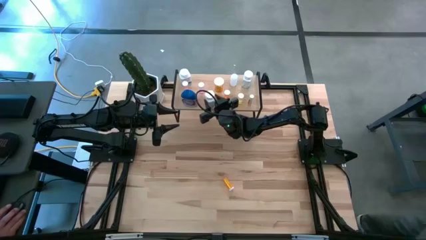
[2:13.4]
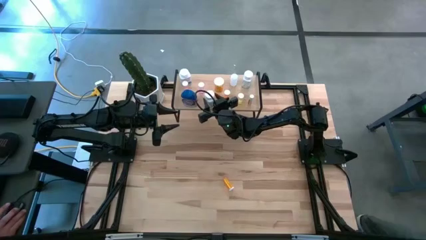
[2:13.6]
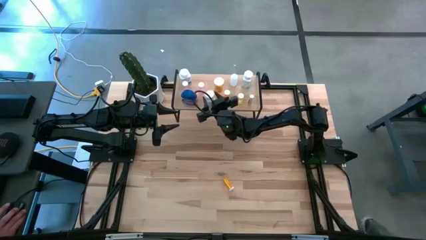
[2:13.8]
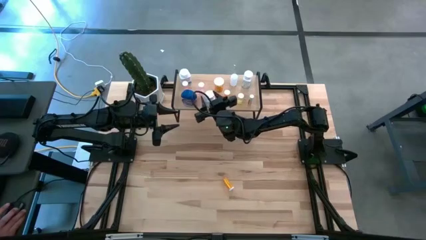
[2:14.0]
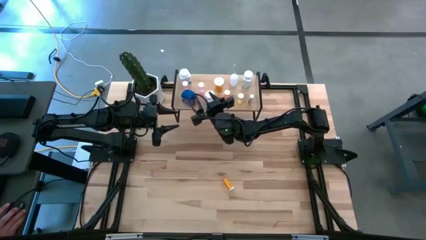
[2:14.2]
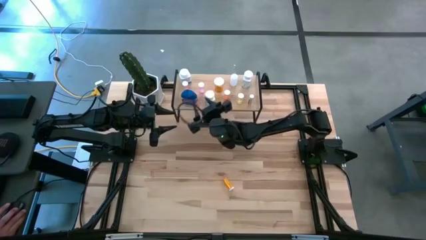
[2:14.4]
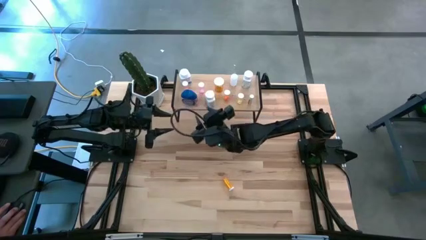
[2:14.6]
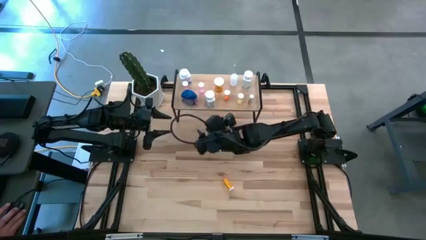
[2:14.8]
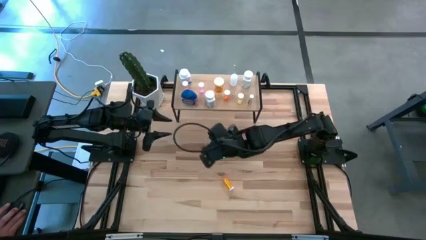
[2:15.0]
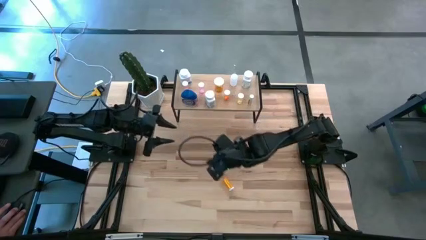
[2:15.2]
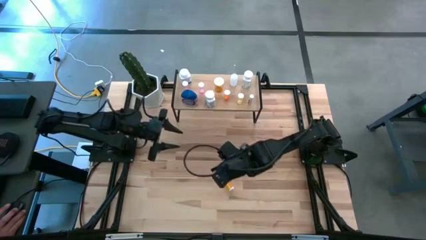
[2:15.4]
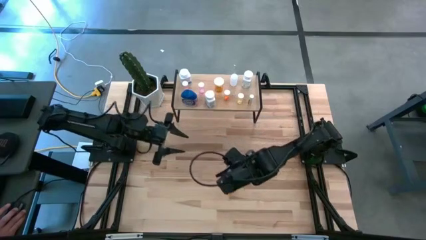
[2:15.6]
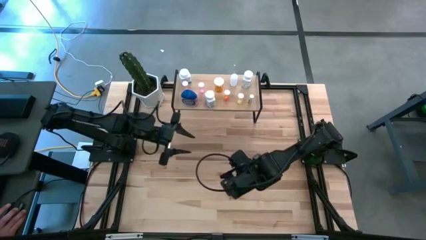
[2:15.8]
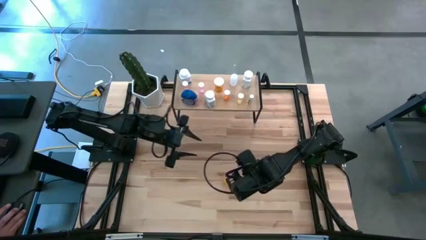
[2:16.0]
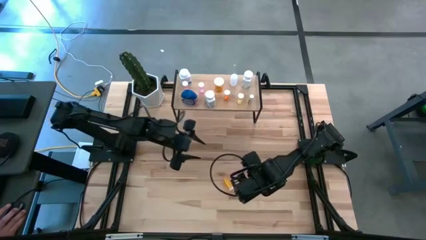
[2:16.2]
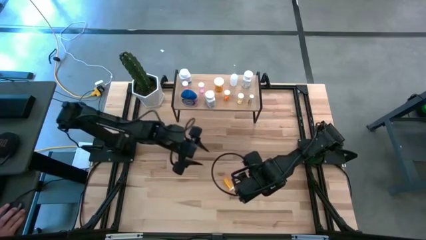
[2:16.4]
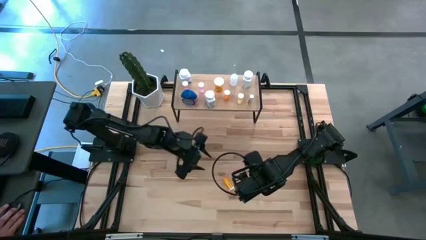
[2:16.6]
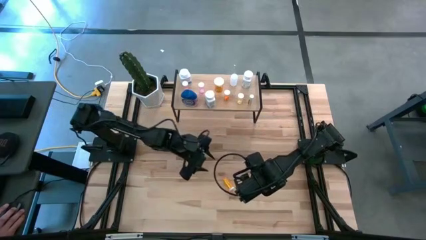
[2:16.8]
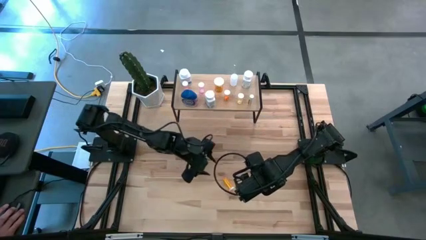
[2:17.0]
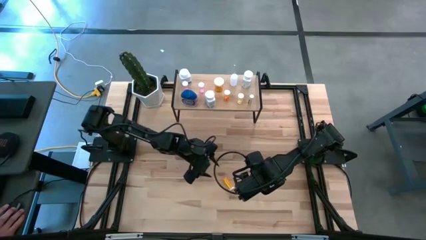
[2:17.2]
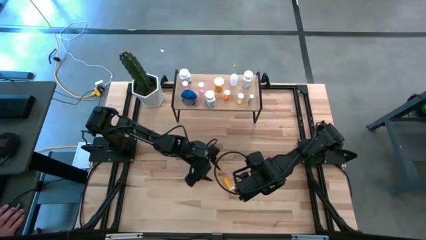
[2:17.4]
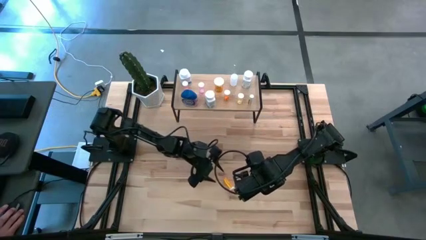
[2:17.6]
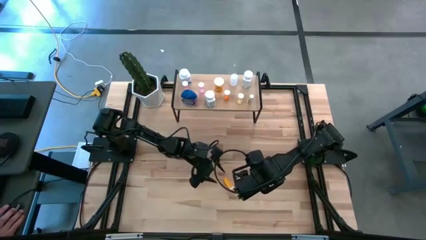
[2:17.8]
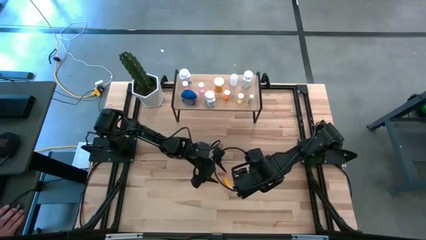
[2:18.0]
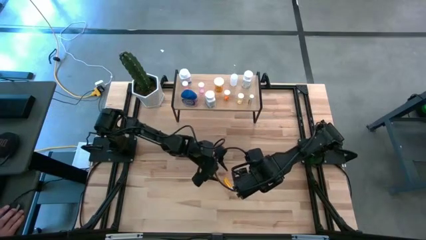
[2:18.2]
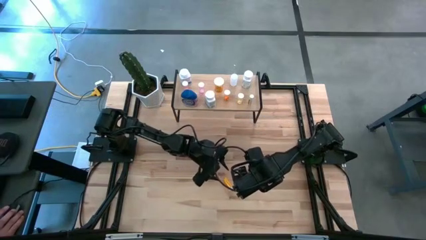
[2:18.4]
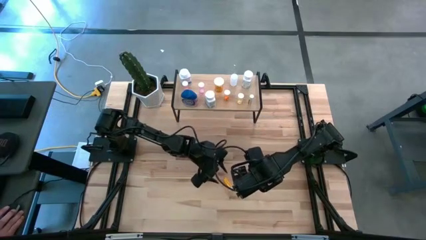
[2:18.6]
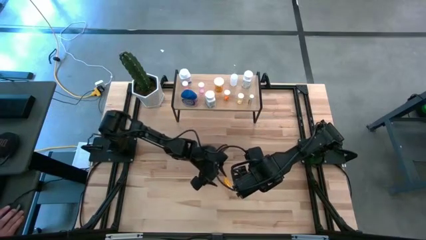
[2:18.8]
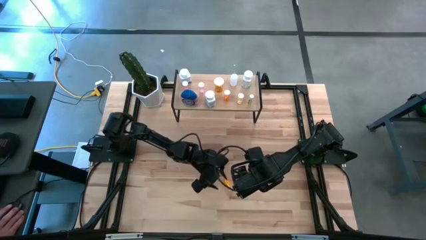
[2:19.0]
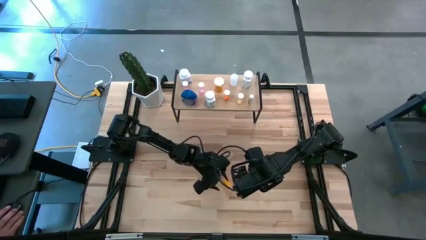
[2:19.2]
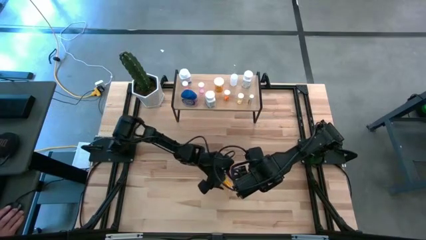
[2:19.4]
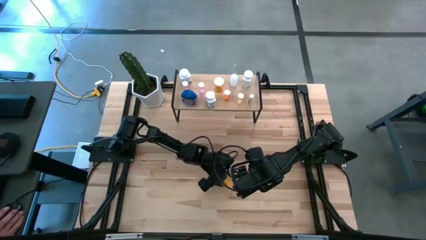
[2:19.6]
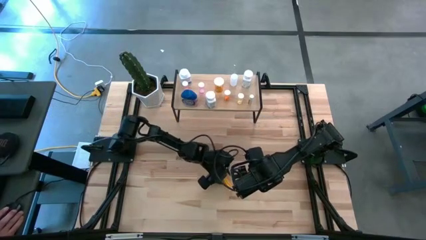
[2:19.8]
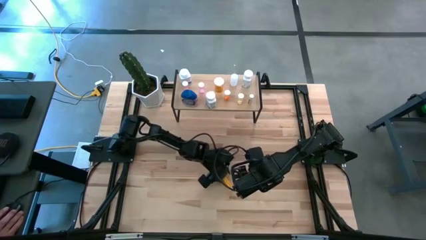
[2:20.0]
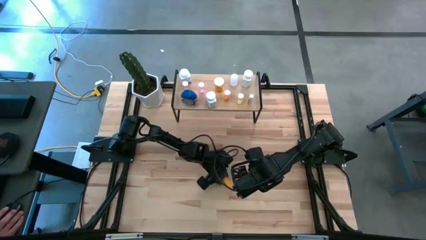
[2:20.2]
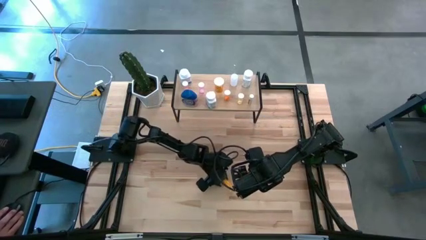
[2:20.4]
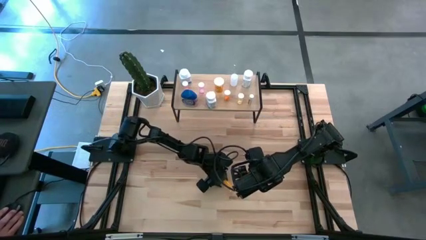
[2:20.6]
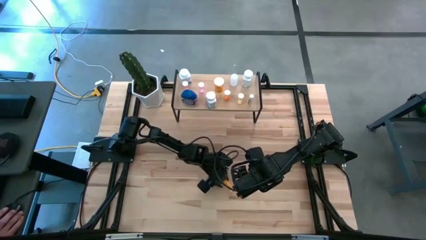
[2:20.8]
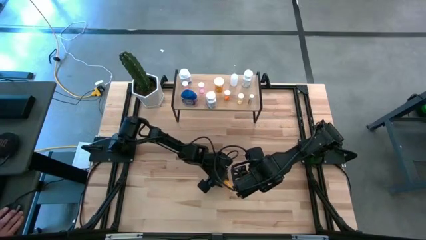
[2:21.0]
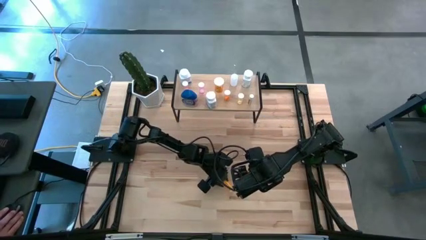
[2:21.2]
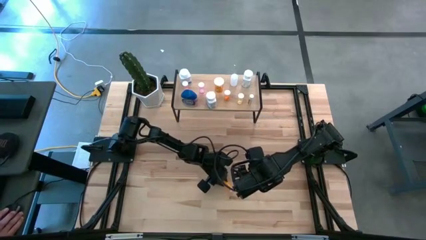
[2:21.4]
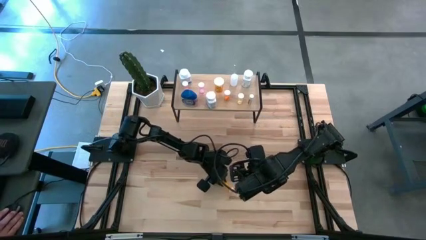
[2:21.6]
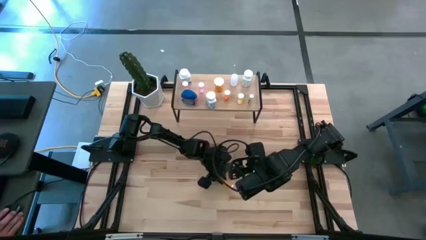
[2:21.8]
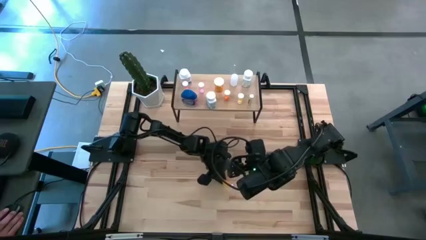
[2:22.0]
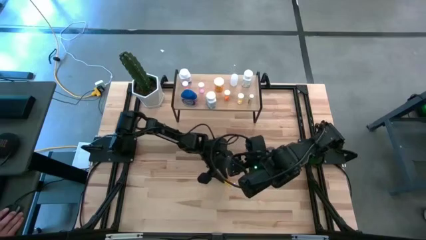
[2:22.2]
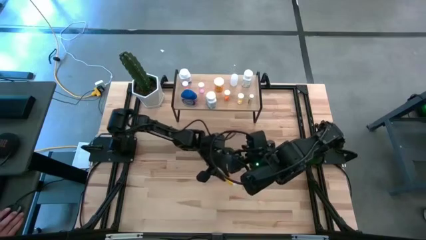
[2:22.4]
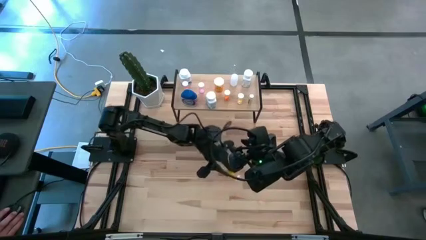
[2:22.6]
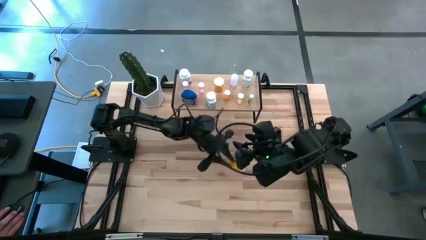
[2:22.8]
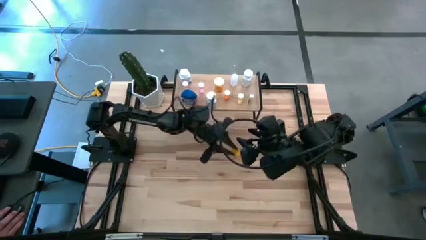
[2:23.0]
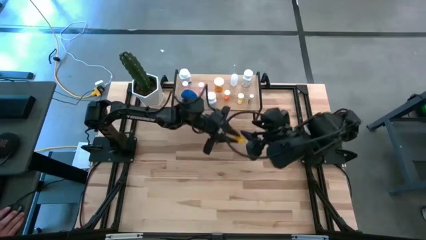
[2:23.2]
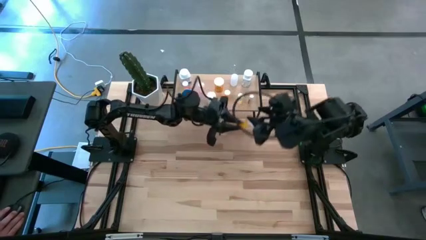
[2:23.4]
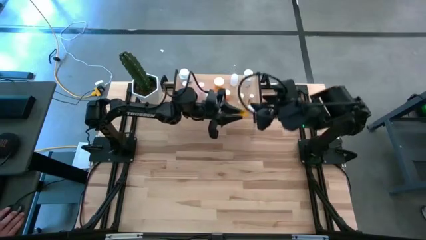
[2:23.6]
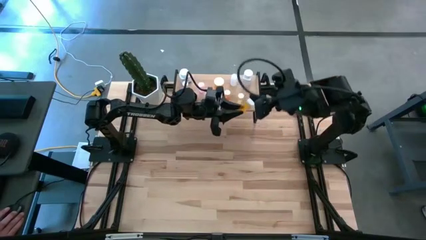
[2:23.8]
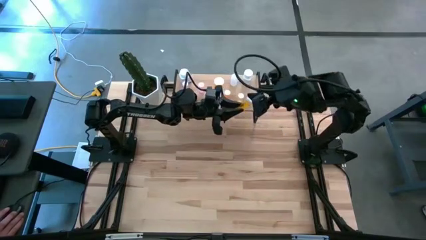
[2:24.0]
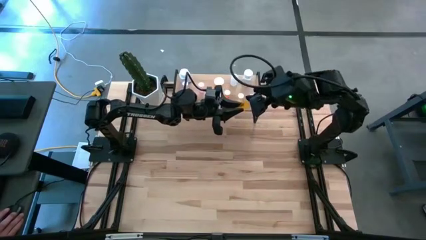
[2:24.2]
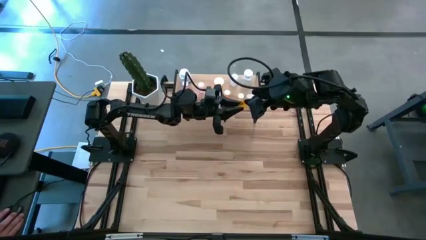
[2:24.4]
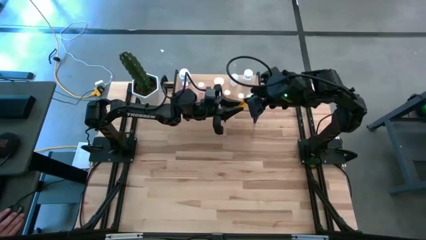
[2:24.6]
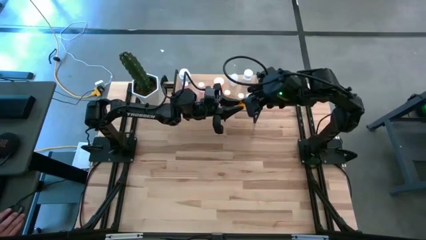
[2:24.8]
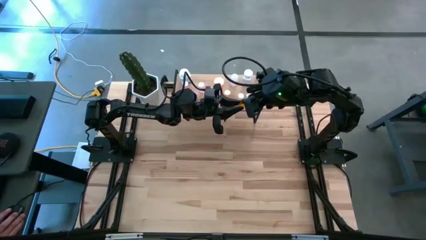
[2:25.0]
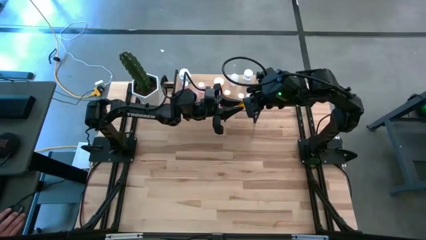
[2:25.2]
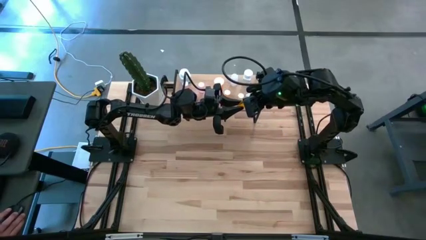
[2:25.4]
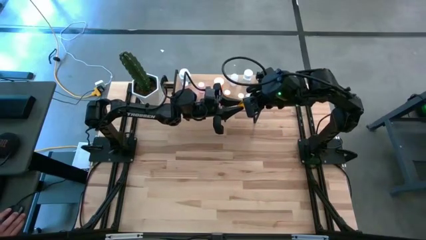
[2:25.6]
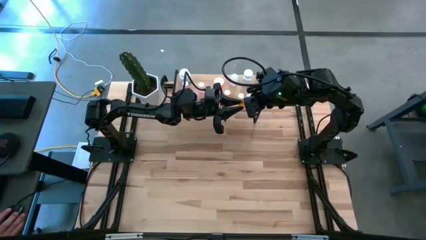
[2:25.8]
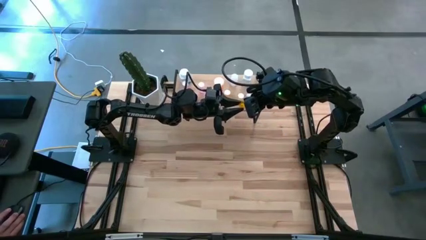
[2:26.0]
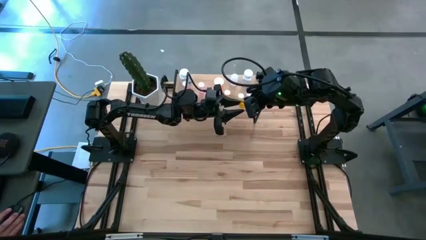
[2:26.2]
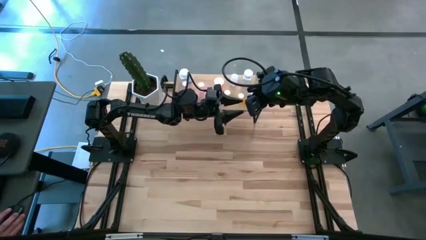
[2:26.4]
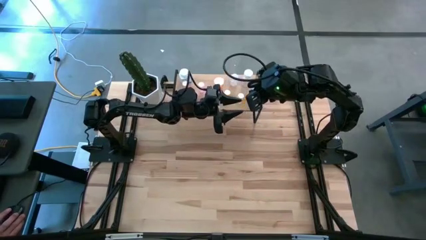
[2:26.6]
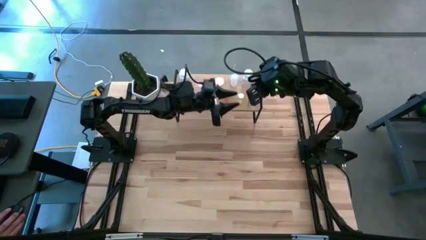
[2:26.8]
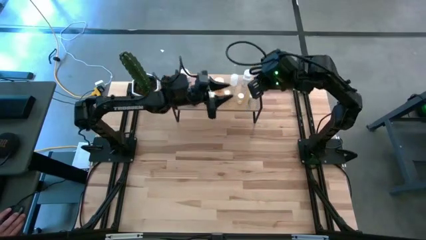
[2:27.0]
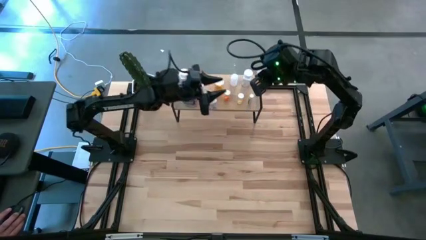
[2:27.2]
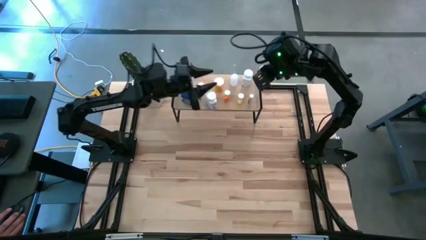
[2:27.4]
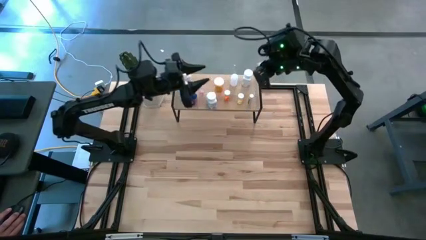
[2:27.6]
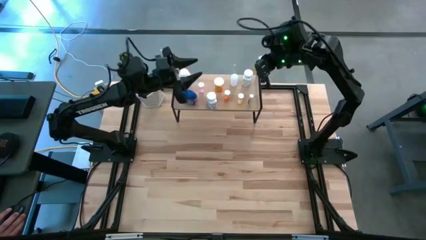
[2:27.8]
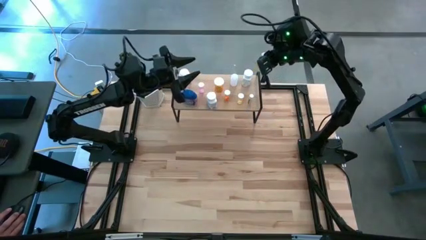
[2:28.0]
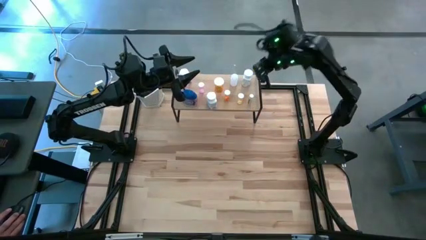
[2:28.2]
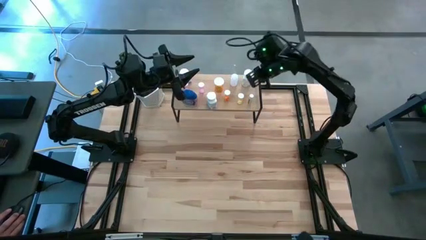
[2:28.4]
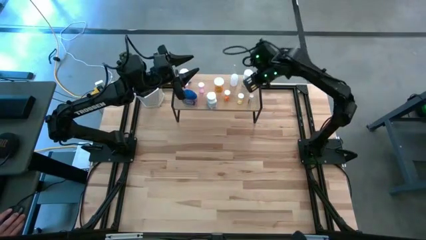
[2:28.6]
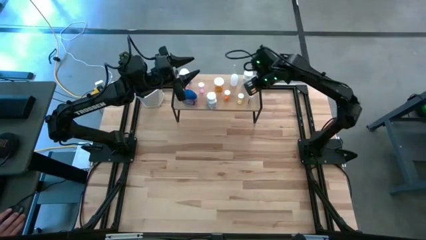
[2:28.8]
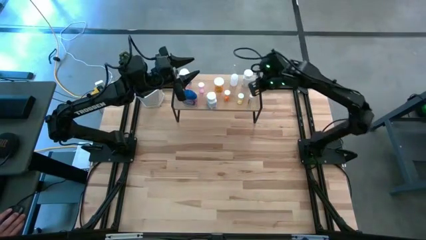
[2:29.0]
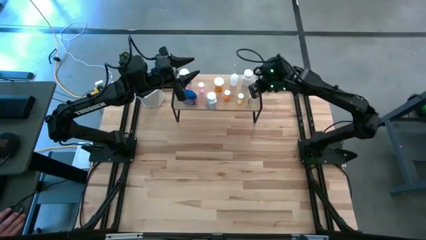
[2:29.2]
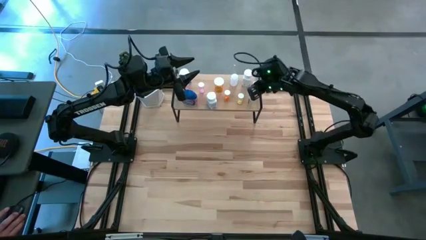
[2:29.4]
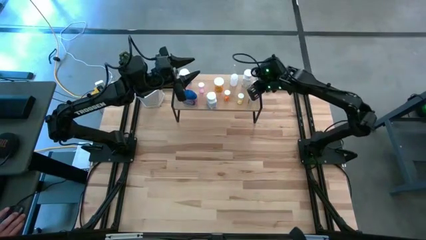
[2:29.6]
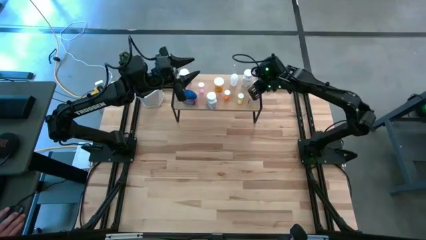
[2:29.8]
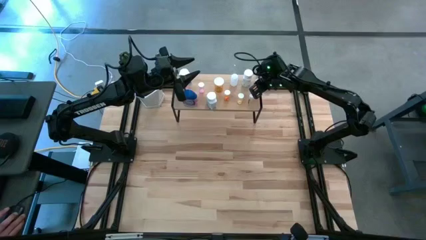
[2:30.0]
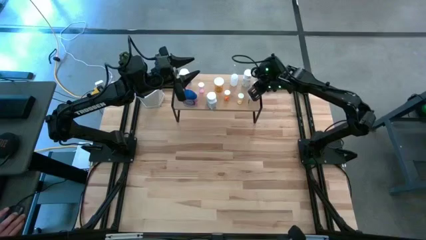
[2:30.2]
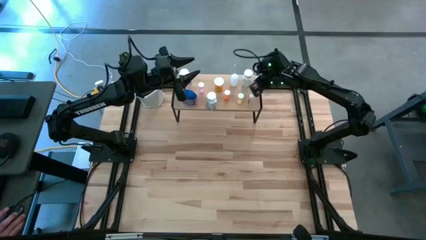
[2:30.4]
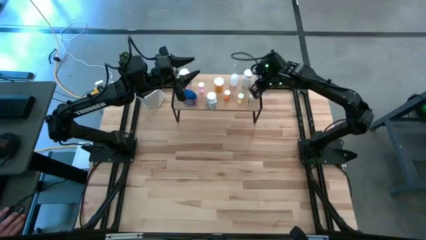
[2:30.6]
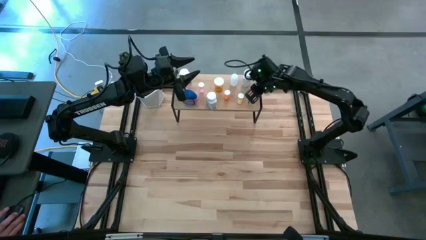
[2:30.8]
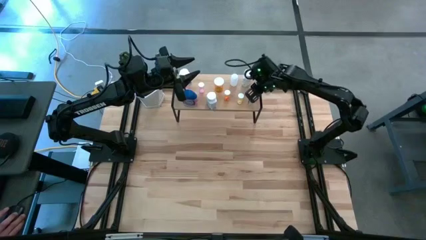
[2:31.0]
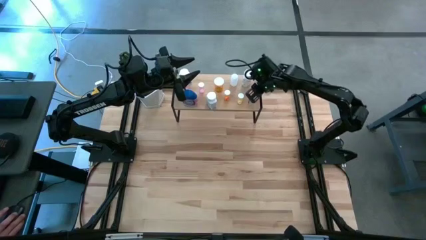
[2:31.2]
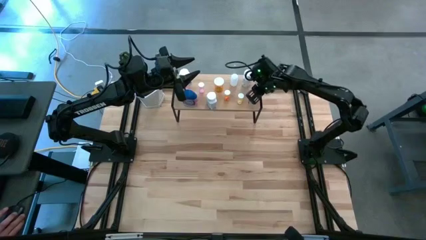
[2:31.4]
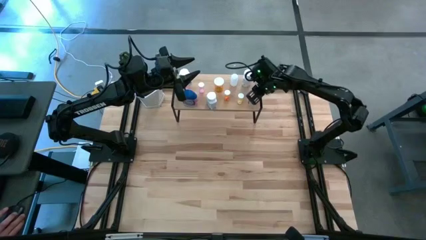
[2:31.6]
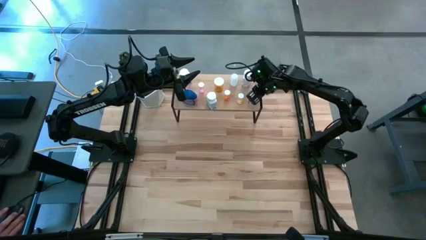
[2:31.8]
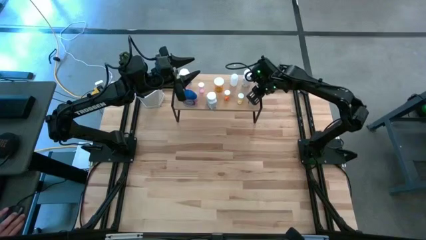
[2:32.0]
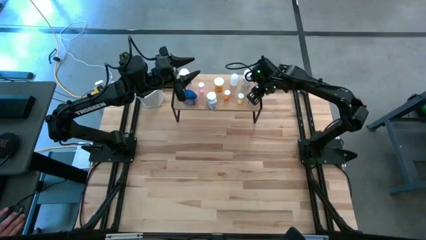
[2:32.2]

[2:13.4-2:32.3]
Task: Pick and place medicine bottles onto shelf by color
Put the orange small pill bottle on the shelf
